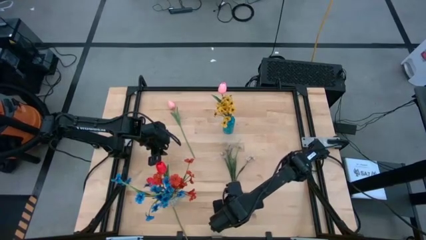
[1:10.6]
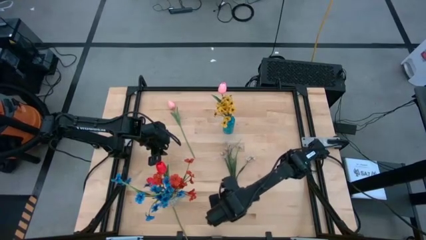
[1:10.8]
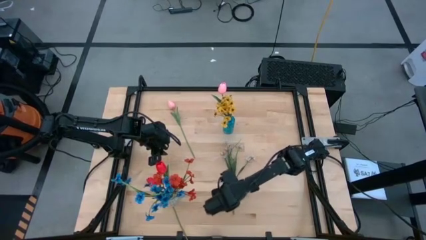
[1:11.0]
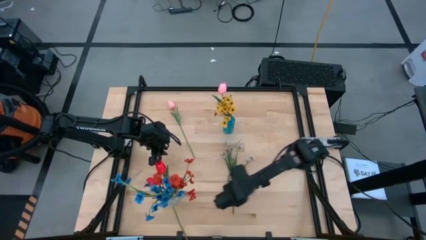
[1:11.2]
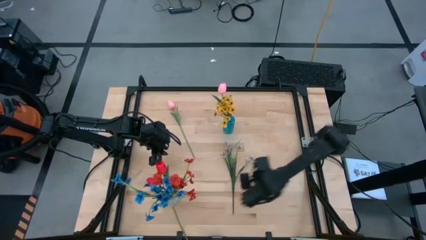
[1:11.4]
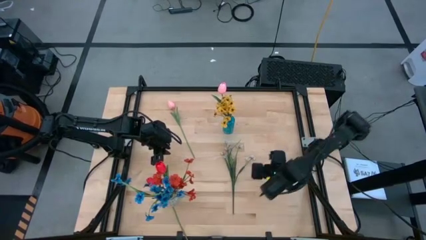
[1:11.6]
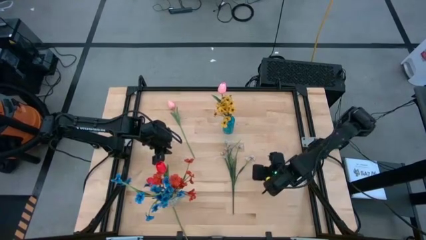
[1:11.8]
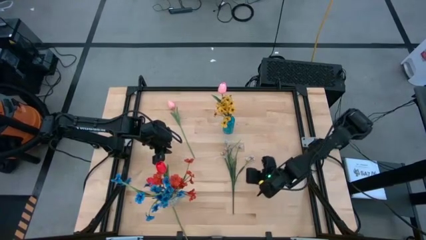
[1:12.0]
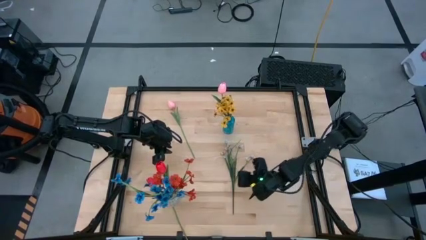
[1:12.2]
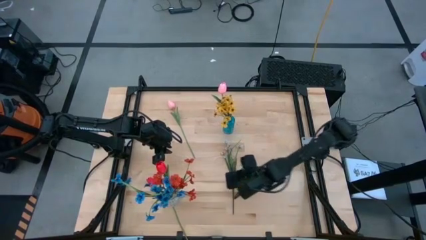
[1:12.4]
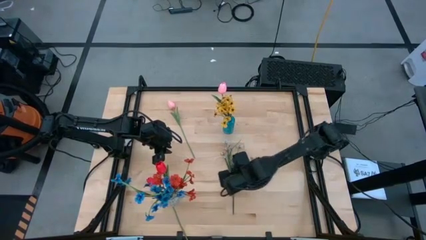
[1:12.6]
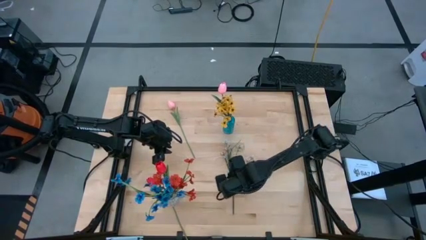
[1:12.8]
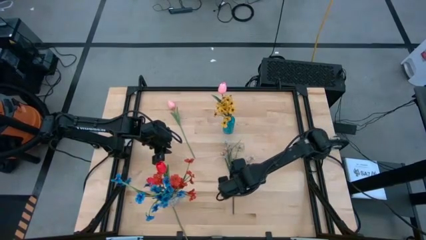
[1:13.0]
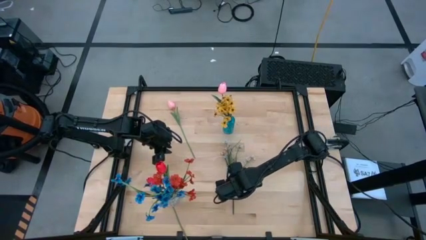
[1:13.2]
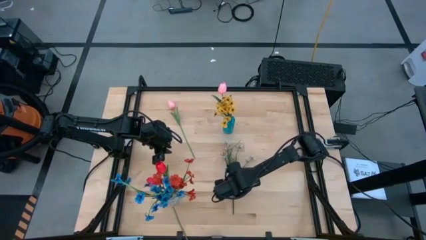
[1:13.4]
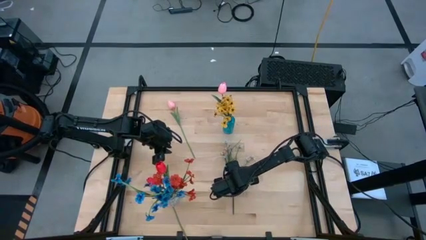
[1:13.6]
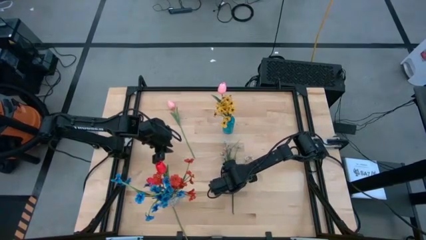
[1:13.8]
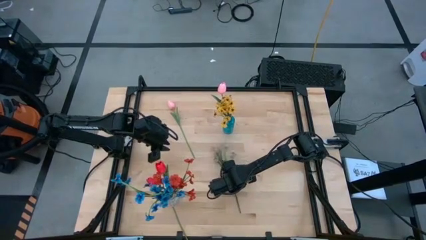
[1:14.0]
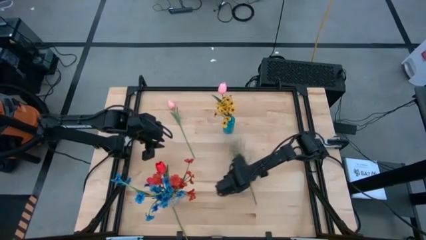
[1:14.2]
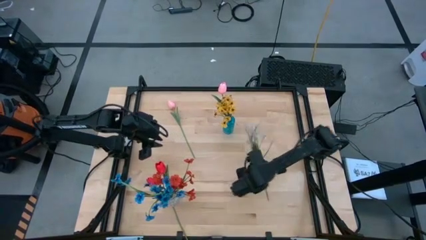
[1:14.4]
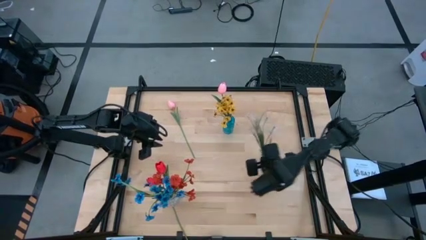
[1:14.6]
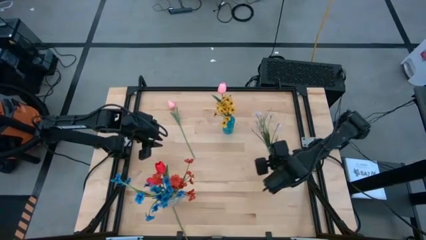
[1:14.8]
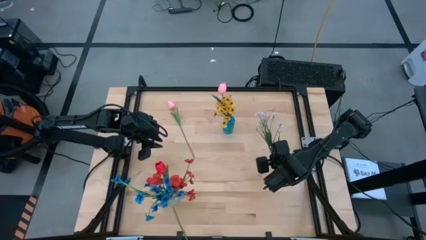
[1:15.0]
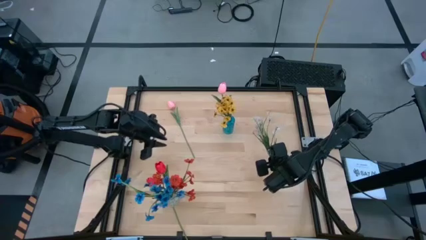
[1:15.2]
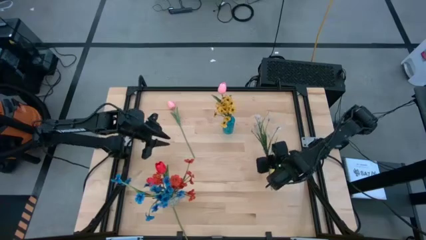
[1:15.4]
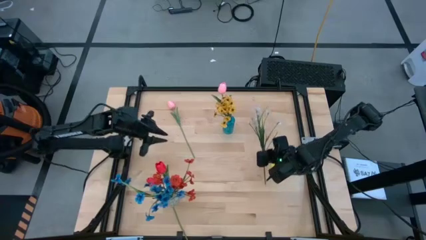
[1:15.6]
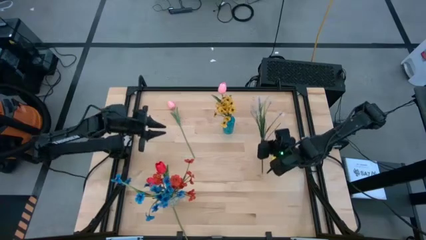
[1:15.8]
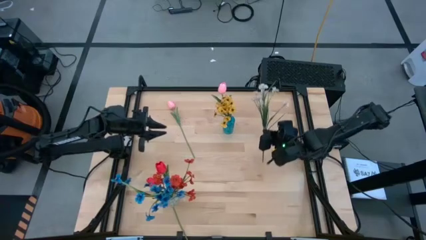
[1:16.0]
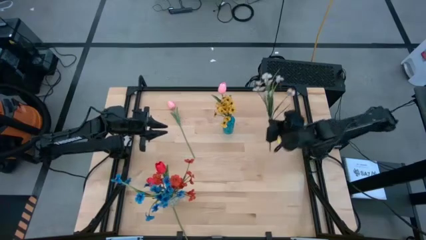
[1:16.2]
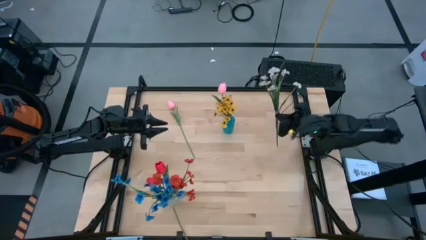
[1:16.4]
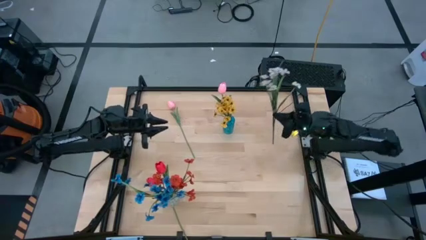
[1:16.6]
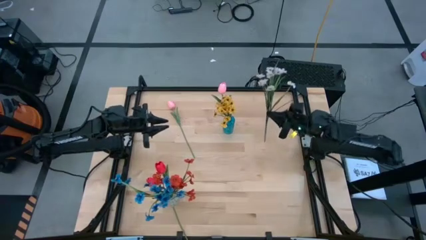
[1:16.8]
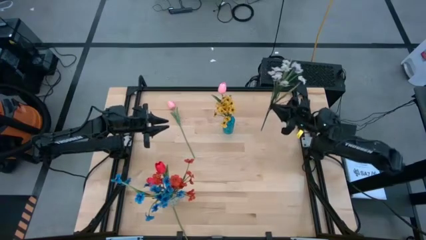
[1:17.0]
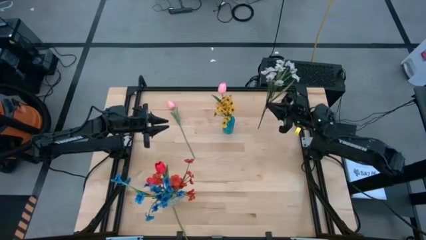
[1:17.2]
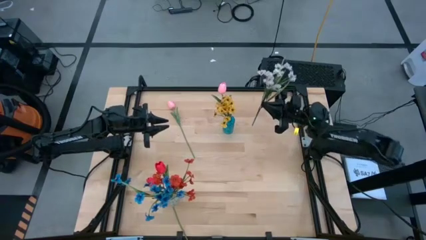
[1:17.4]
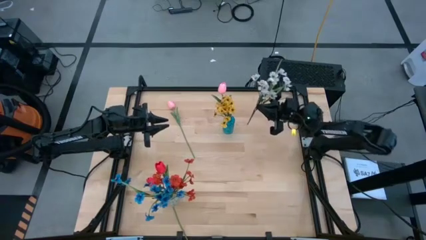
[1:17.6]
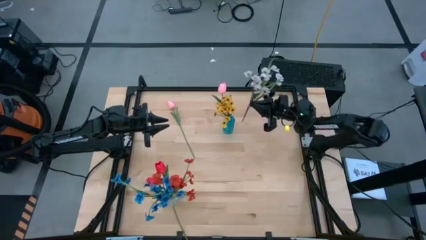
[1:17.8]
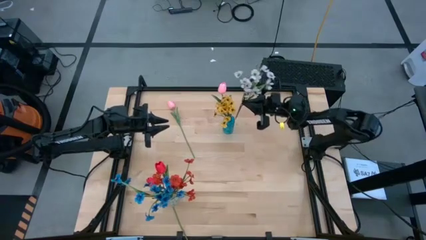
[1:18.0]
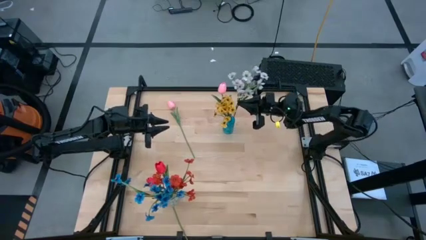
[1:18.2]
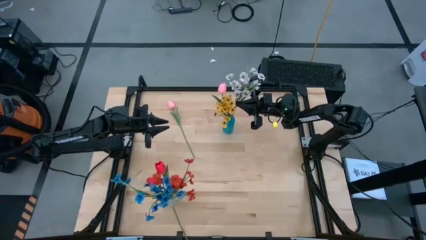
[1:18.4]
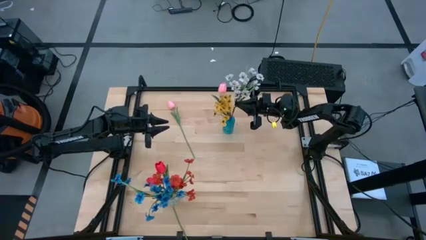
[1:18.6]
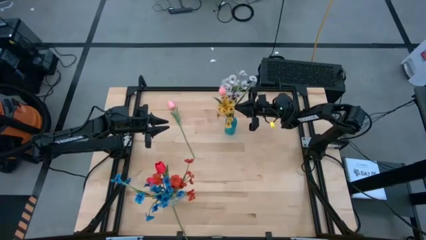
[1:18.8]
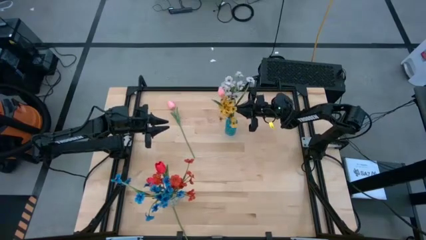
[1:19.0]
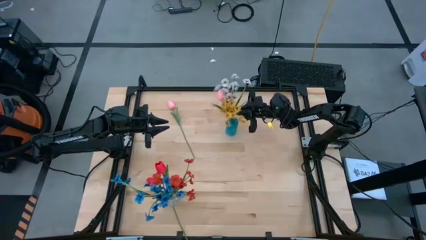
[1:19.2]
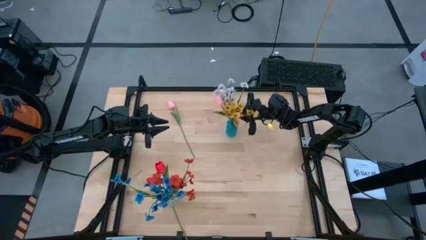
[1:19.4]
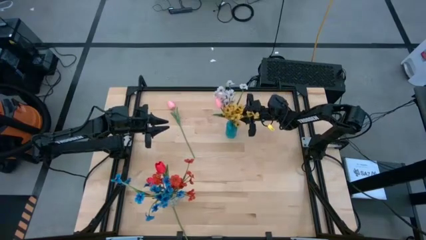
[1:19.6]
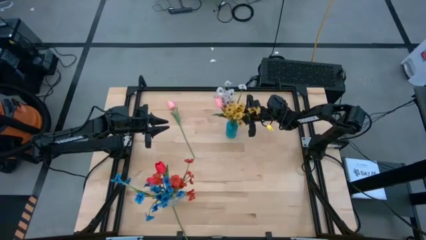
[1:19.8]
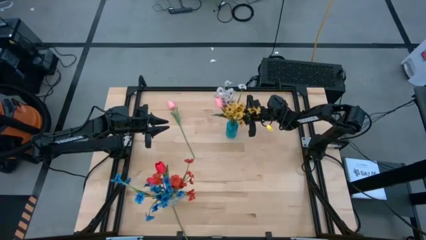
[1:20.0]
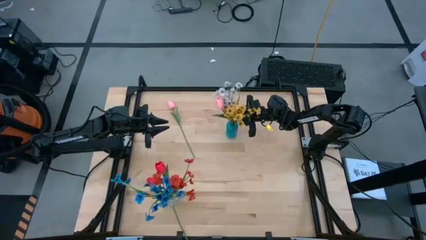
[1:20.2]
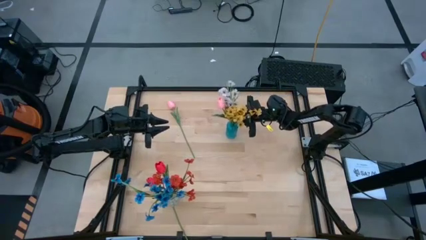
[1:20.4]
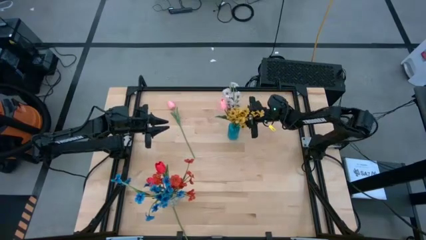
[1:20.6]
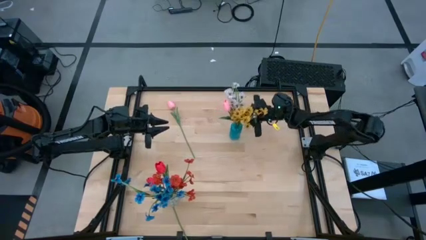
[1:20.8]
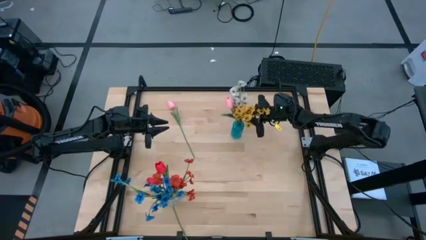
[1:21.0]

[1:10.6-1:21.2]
Task: Sort flowers into vase by color
Put the white flowers into the blue vase

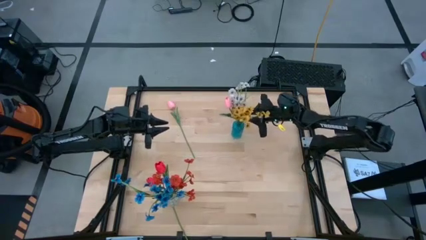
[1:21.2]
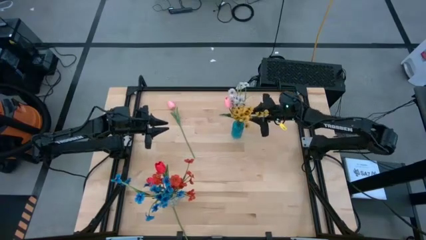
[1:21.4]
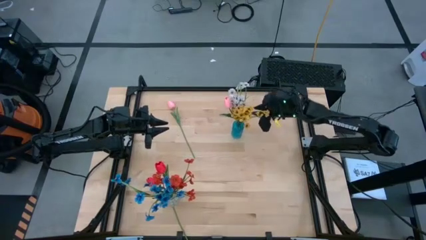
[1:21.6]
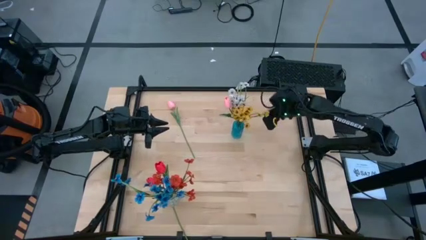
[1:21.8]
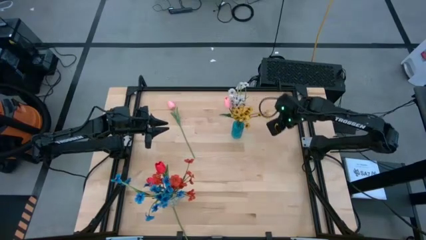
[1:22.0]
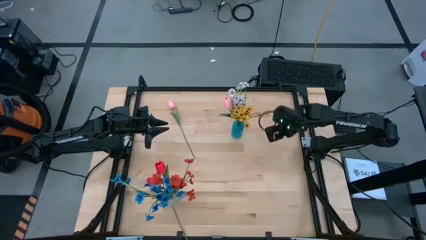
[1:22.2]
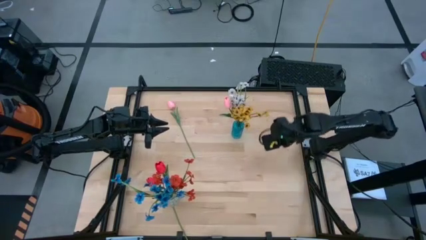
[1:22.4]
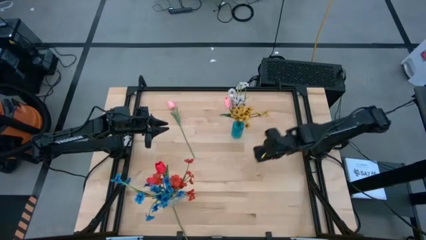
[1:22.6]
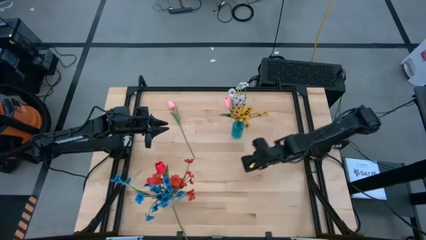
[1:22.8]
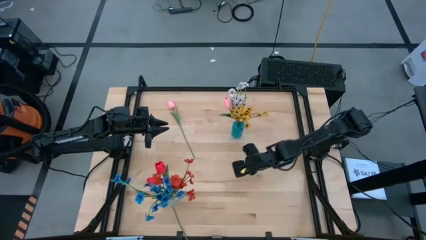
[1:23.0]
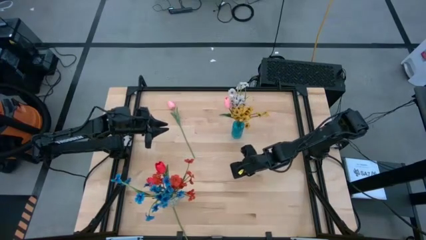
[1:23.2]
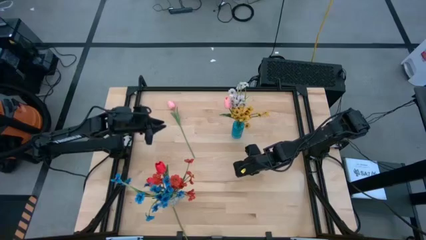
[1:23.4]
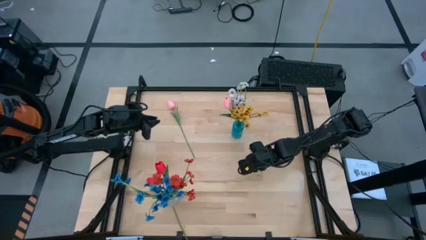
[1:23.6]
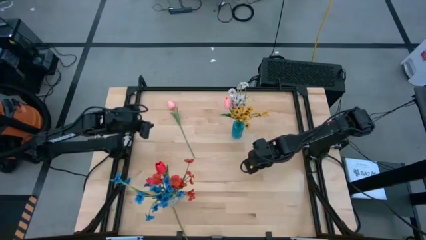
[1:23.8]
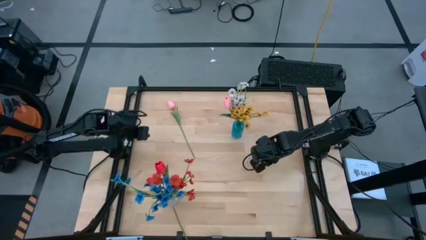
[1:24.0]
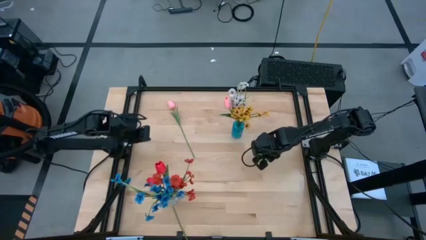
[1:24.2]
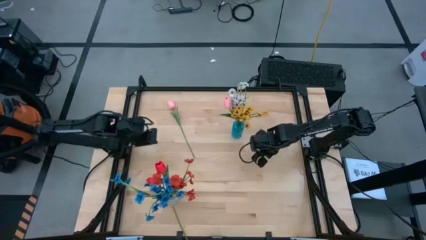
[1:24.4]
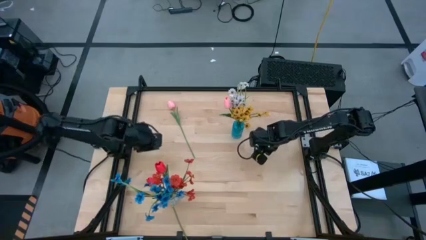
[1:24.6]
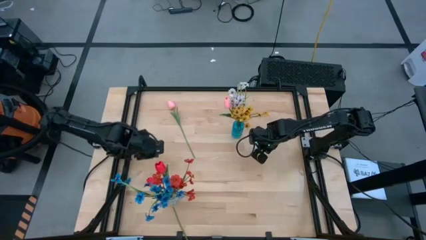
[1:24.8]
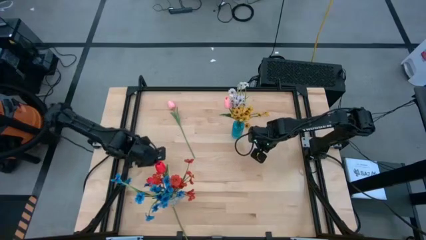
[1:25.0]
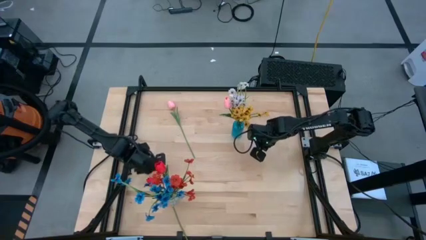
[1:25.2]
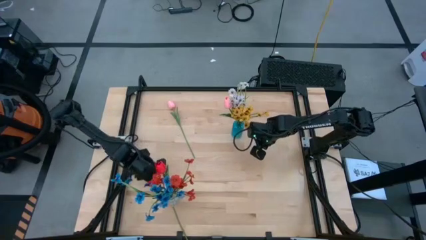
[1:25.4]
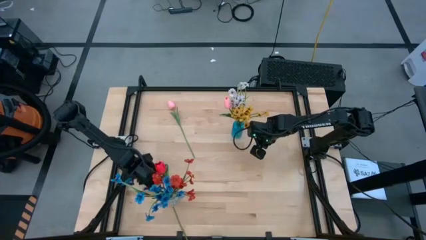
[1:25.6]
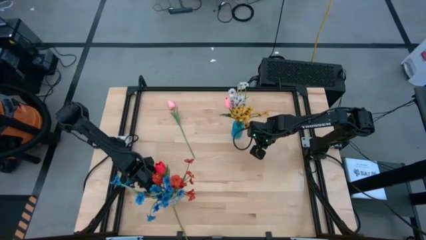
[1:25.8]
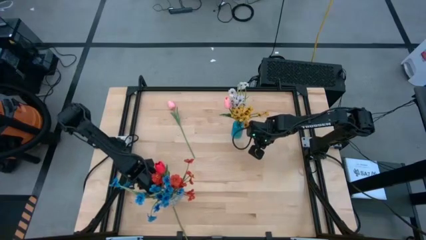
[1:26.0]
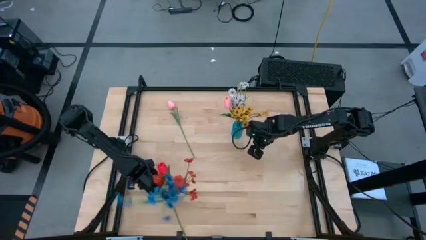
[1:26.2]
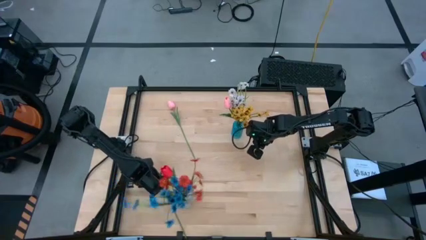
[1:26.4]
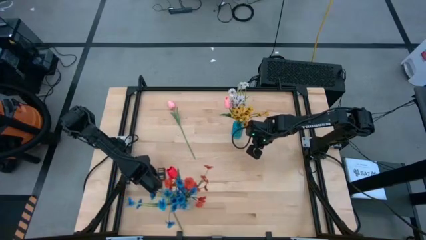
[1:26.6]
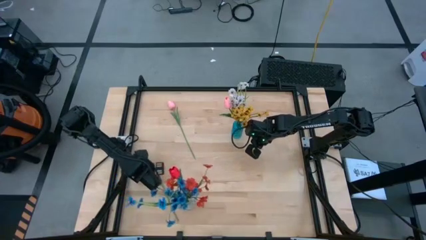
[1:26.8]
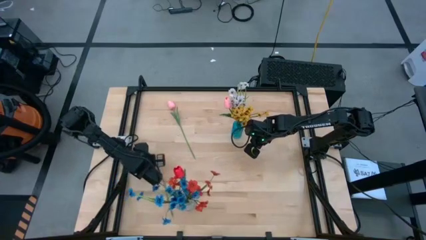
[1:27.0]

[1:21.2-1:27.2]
Put the red tulip into the transparent vase
